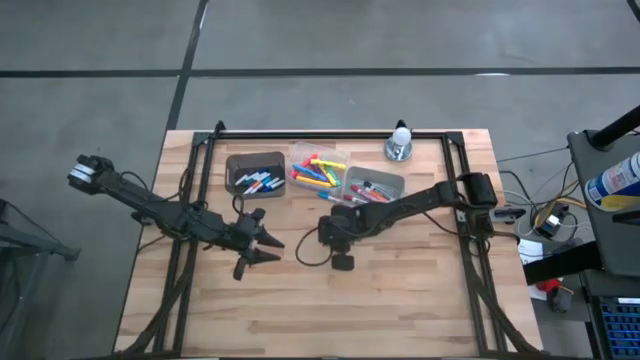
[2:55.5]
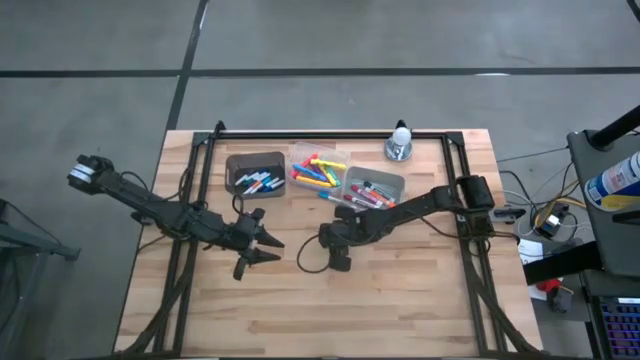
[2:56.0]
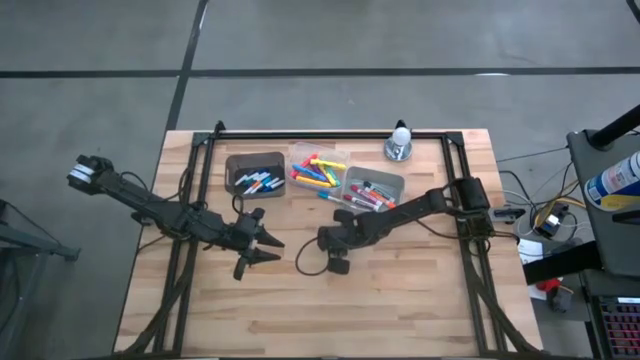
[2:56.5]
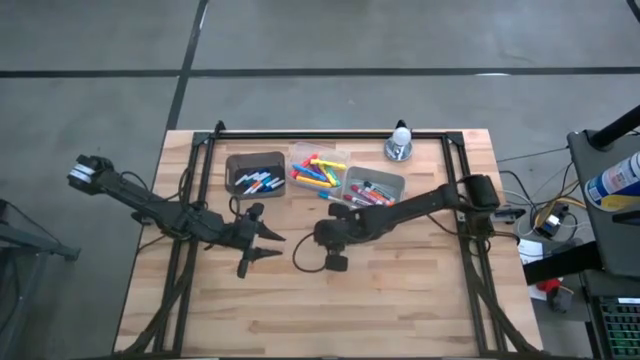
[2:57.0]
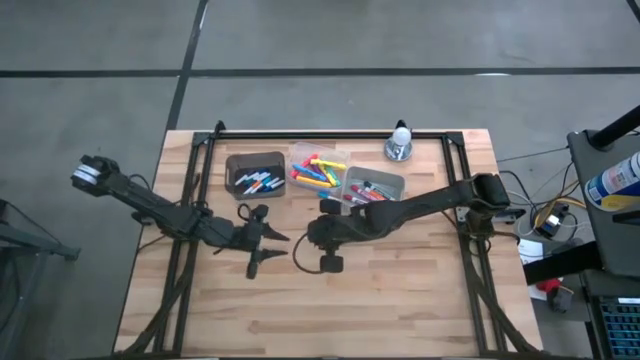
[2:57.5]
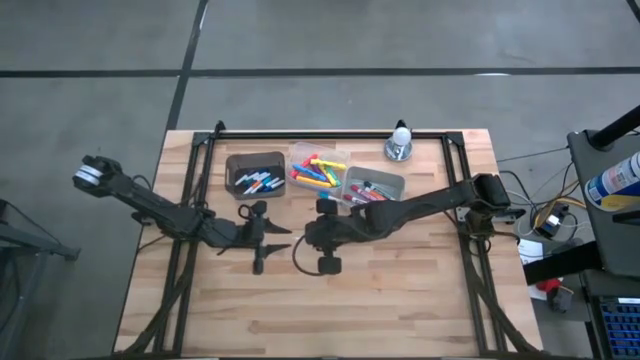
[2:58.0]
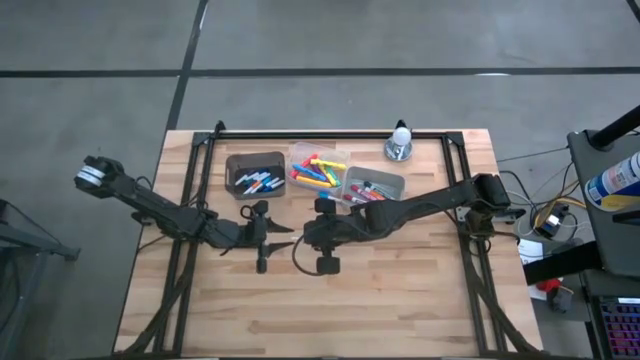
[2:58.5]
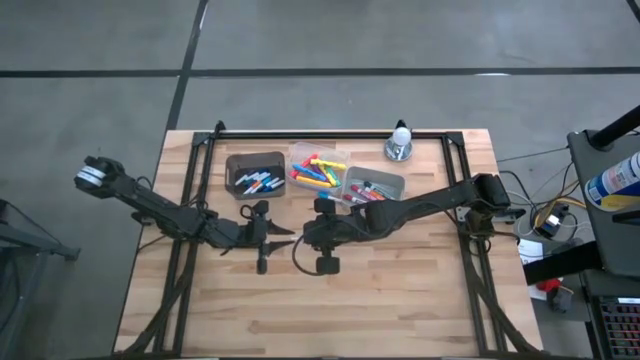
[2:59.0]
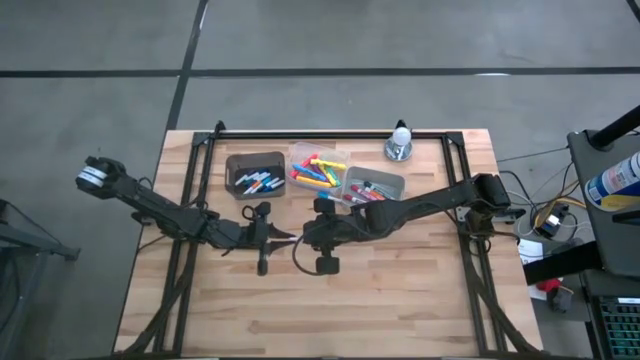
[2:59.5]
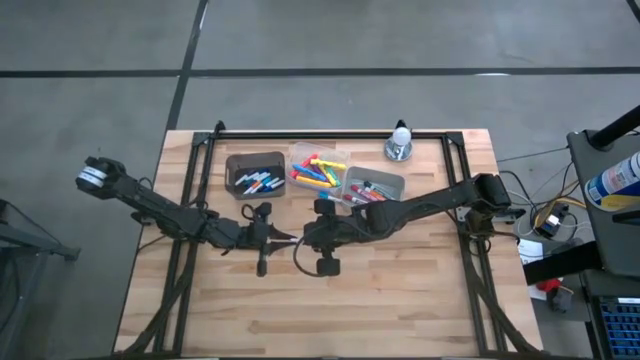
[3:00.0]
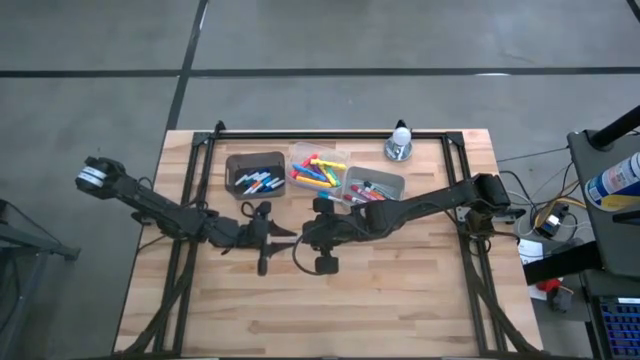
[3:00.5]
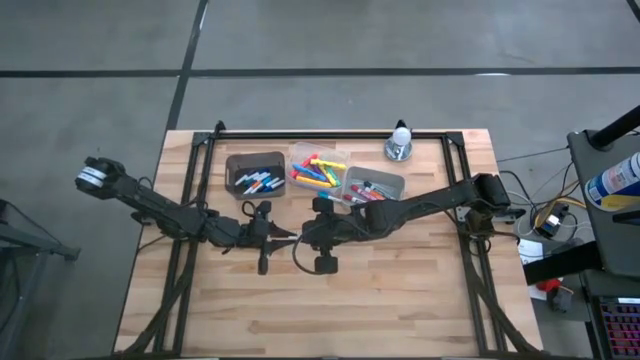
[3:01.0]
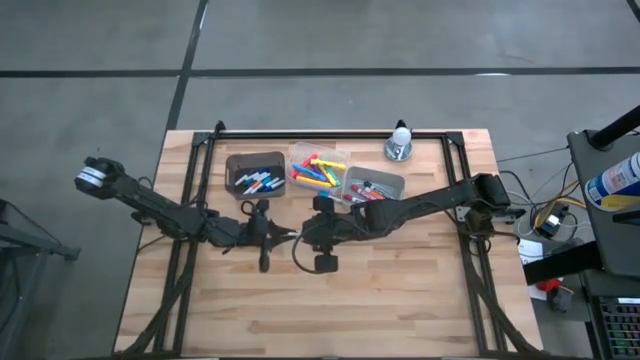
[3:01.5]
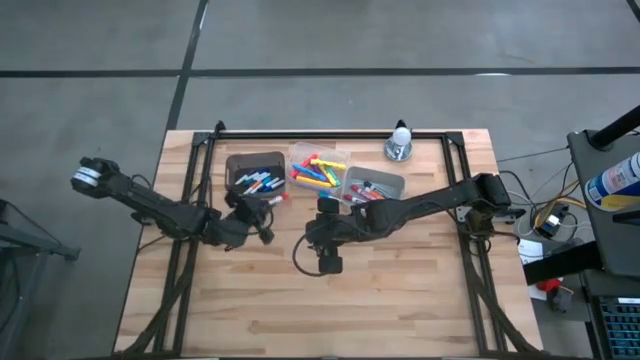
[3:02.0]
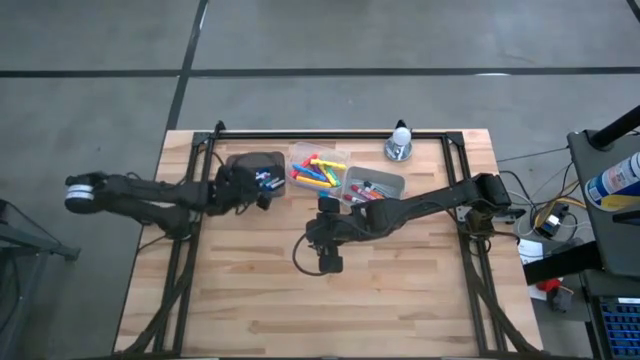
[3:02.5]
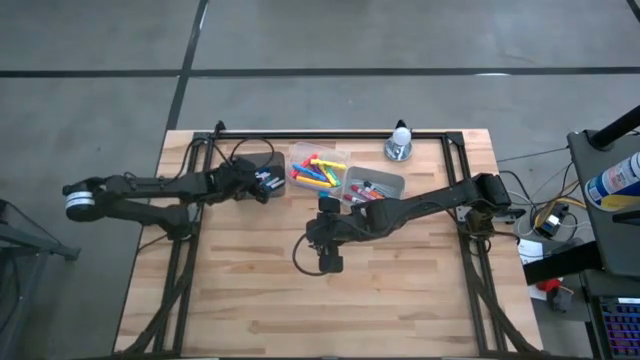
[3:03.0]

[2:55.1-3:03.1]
Task: Pick & Place Markers
Put the red mini marker into the black bin

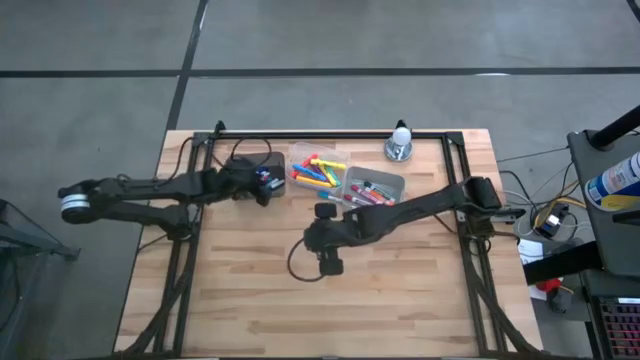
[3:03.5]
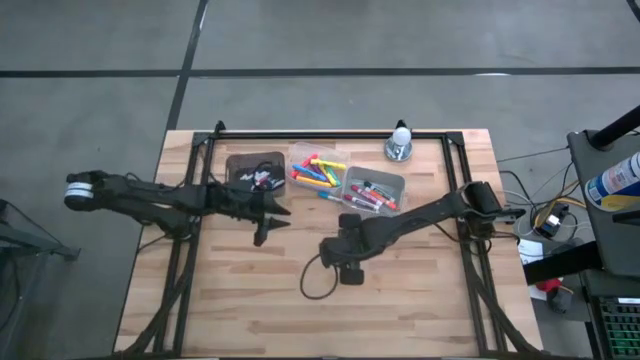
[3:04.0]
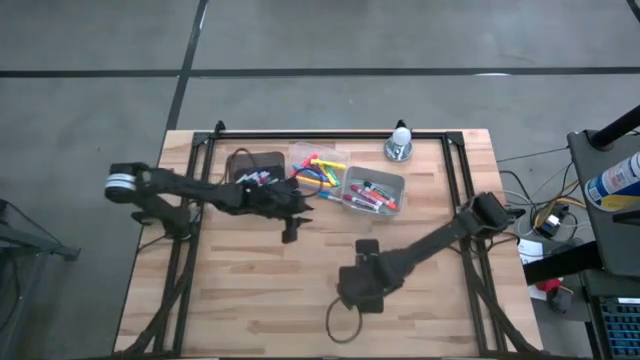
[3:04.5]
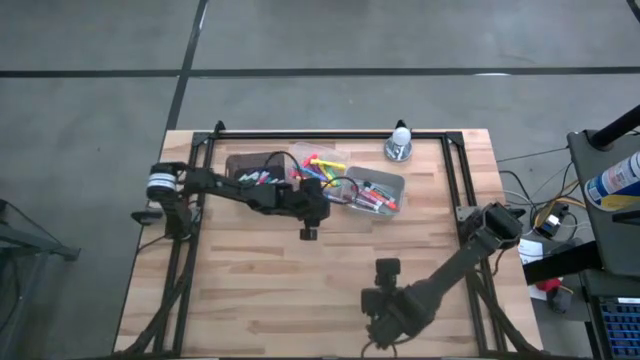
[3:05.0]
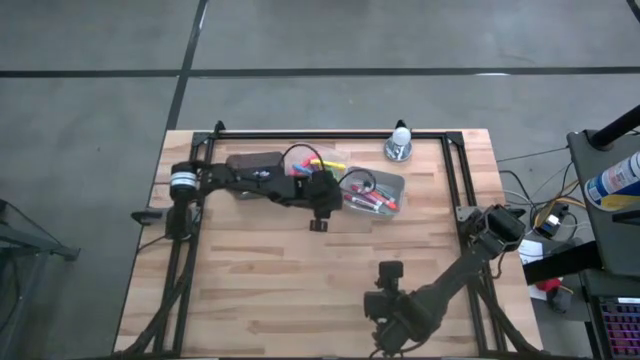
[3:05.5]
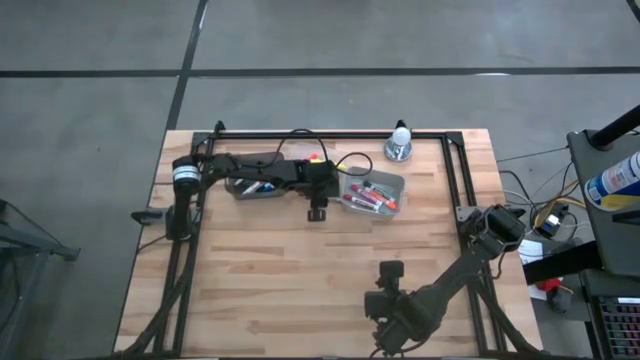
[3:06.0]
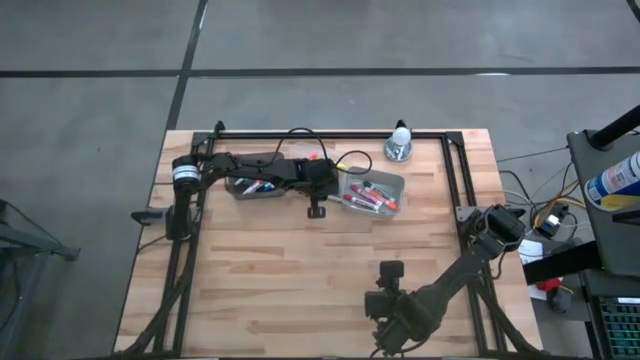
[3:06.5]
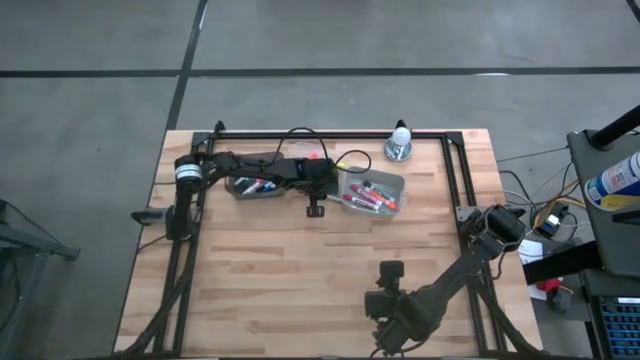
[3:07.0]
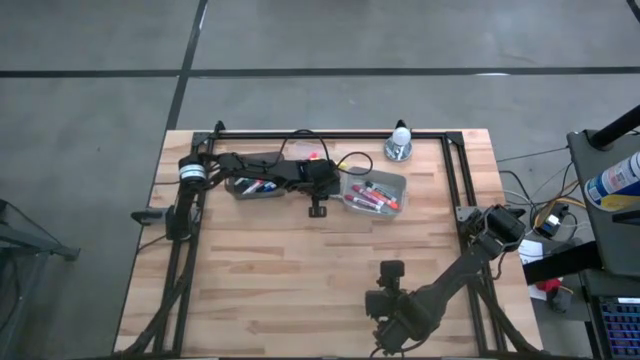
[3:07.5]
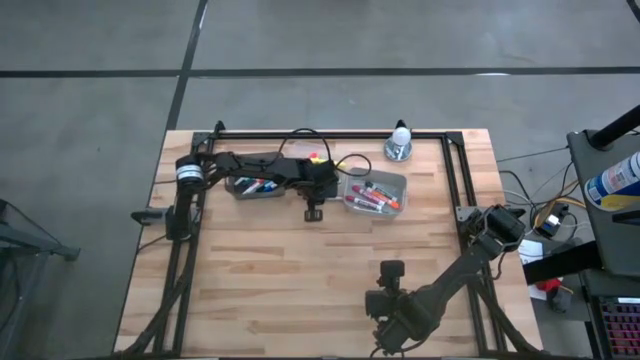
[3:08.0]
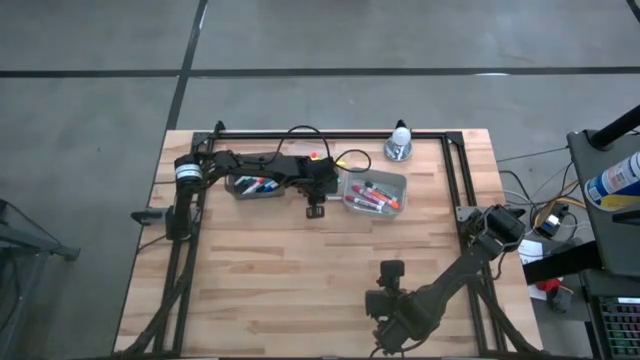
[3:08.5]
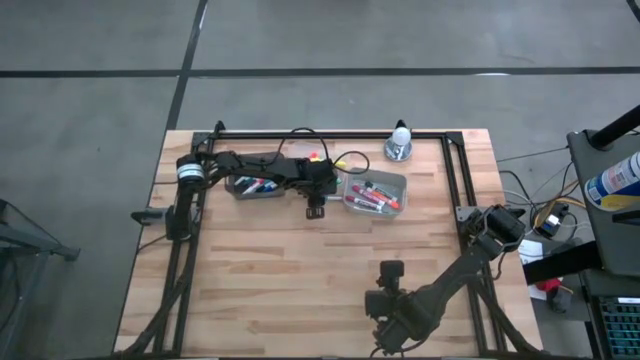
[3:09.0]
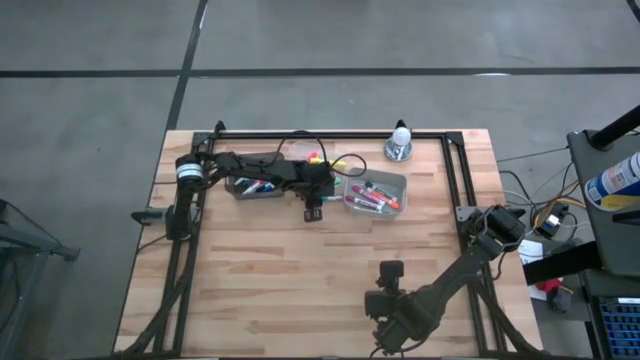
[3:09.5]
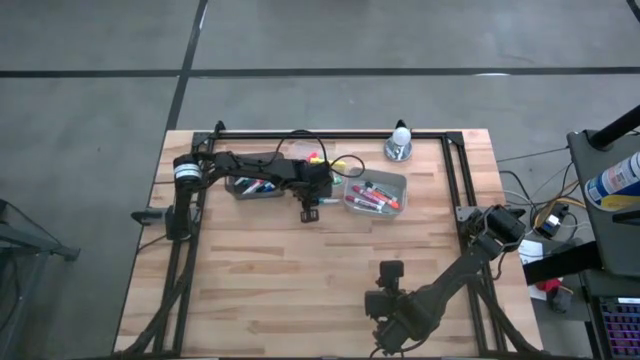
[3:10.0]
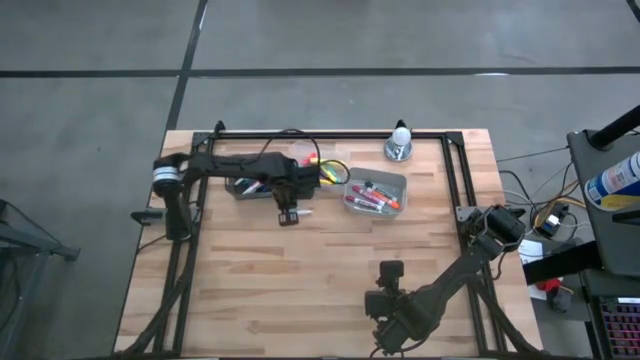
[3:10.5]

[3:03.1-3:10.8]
Put the blue mini marker into the black bin

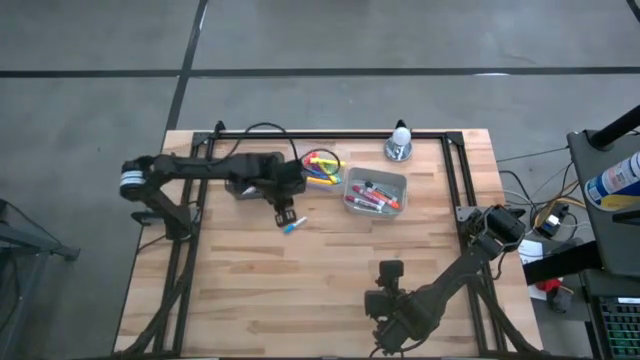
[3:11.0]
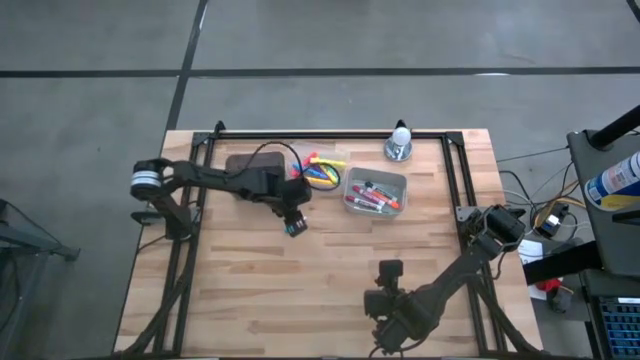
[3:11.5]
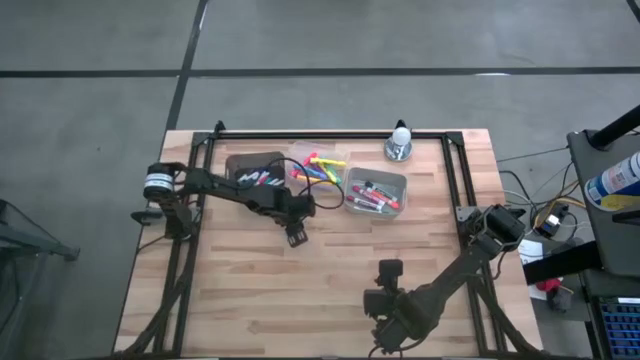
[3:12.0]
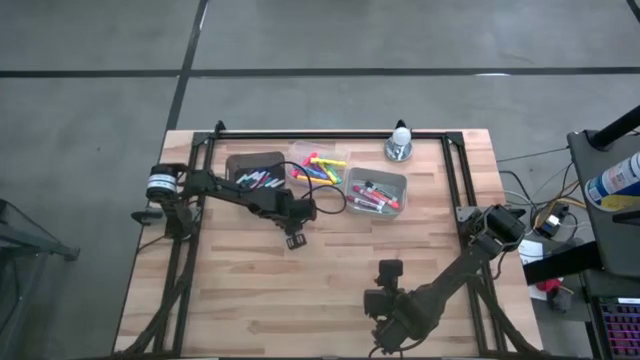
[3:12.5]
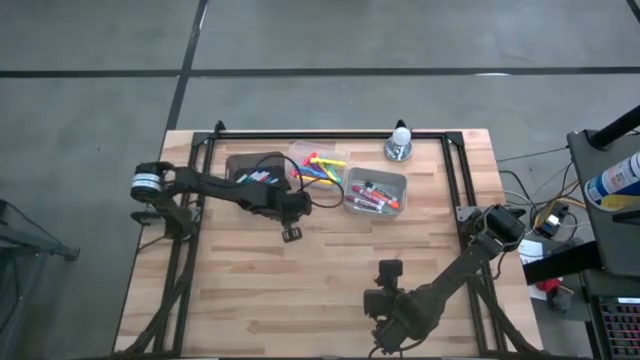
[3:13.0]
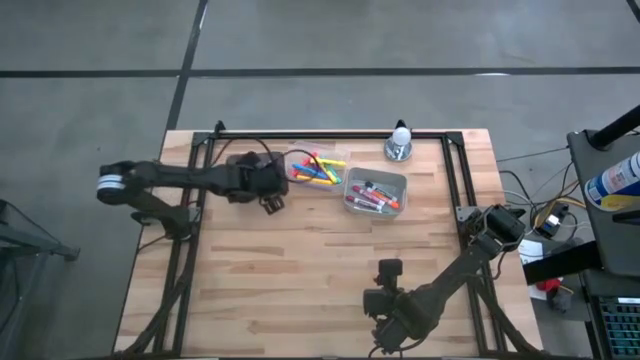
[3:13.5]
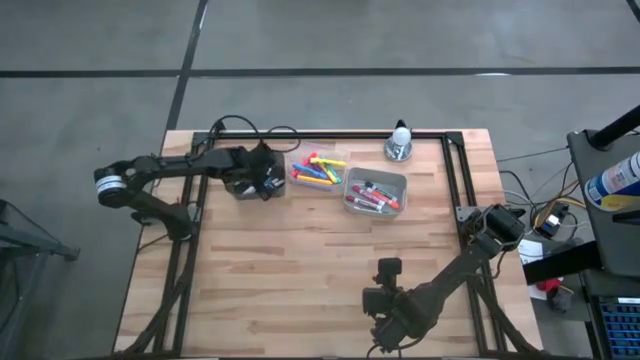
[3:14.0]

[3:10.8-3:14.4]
Put the blue mini marker into the black bin

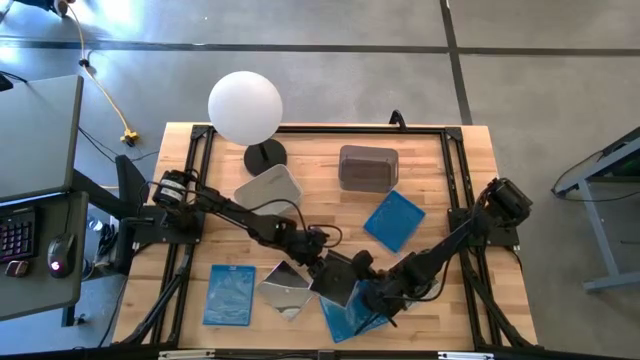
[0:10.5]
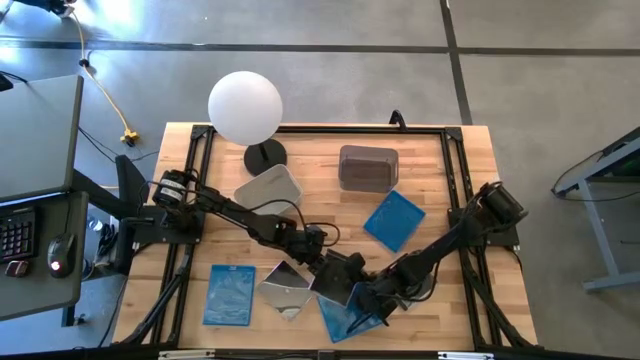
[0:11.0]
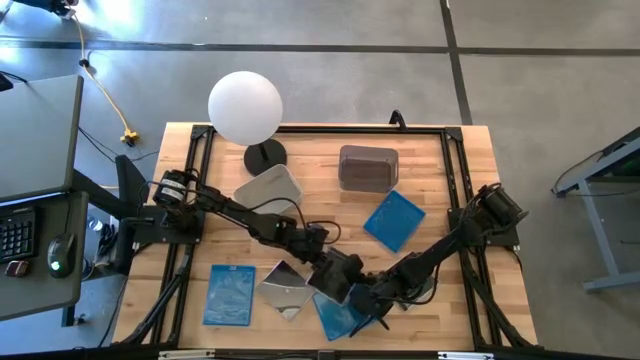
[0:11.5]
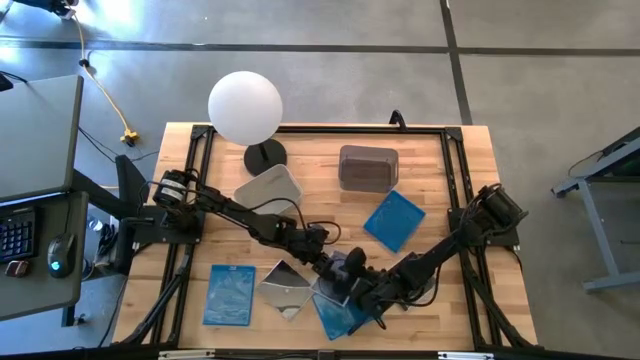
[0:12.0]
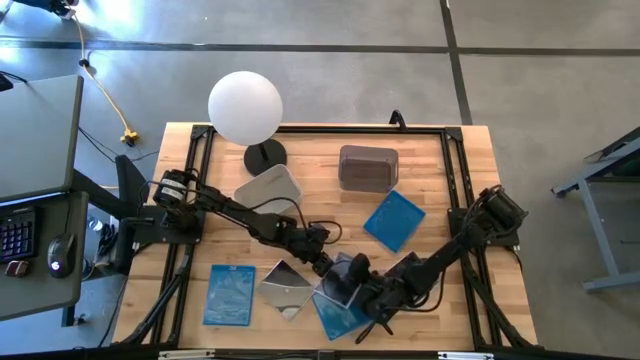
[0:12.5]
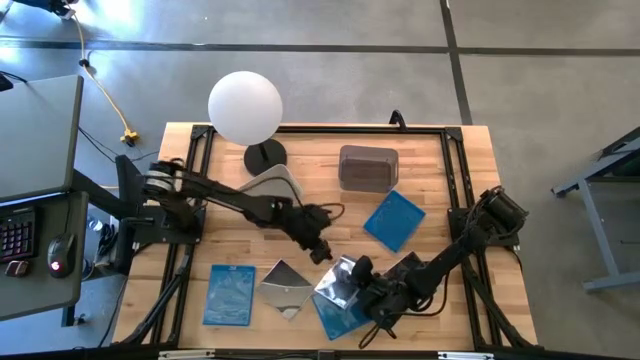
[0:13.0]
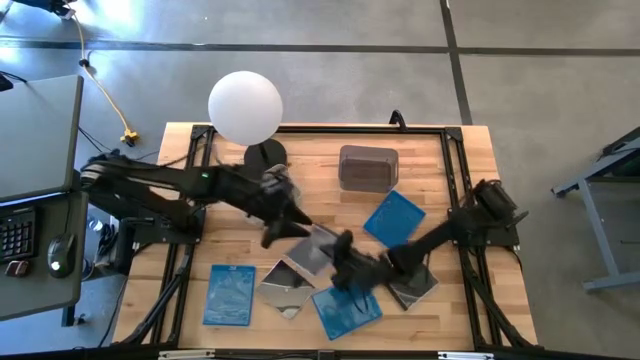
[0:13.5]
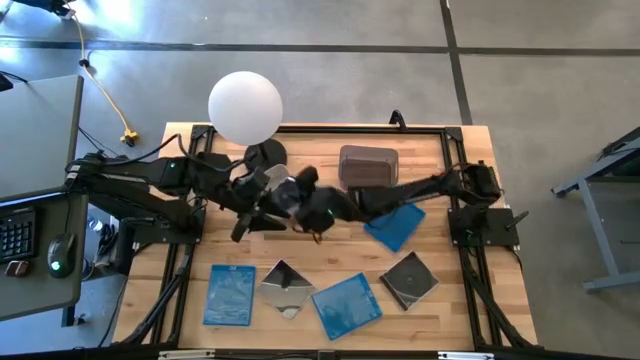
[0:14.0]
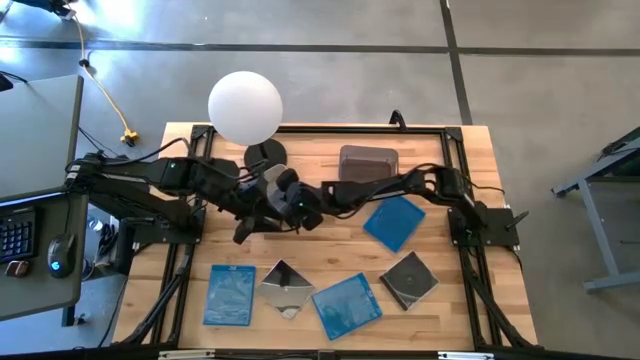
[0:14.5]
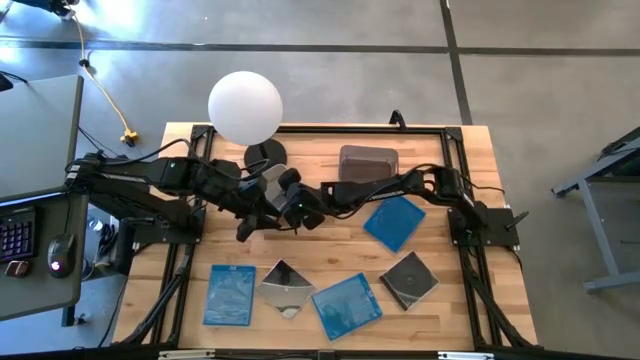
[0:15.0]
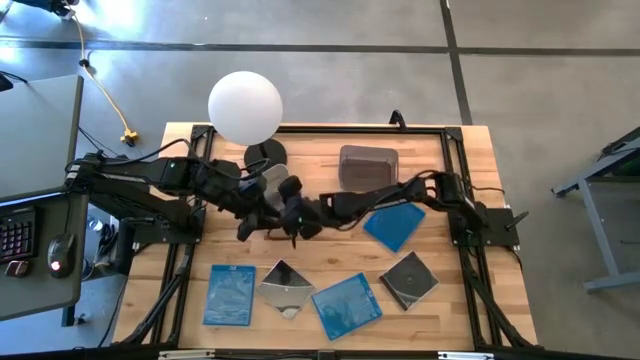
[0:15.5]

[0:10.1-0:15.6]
Task: Pick & place jewel cases by type
Put the middle black CD case into the gray bin
